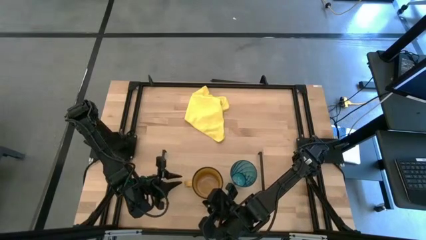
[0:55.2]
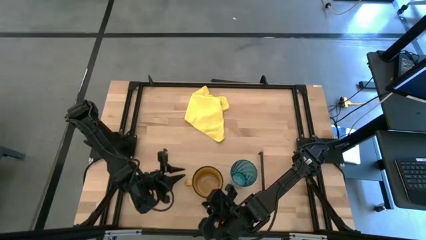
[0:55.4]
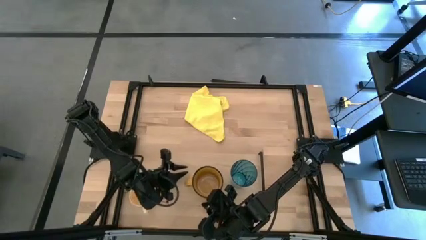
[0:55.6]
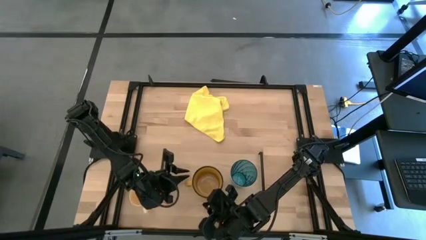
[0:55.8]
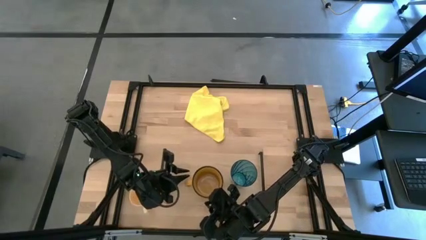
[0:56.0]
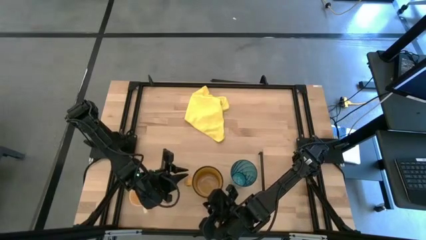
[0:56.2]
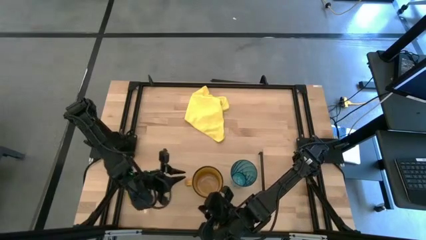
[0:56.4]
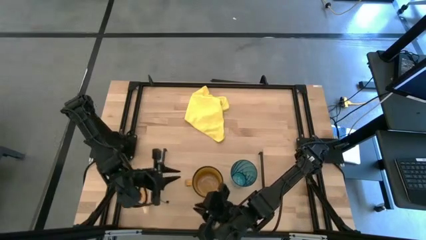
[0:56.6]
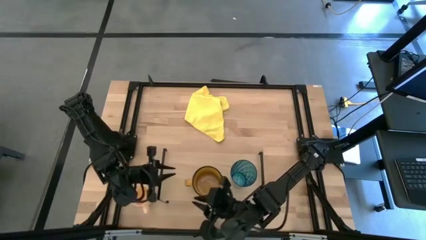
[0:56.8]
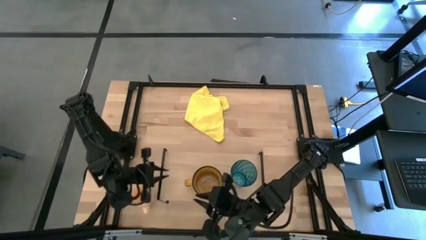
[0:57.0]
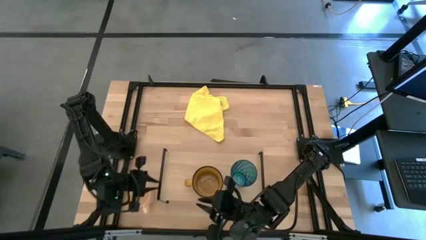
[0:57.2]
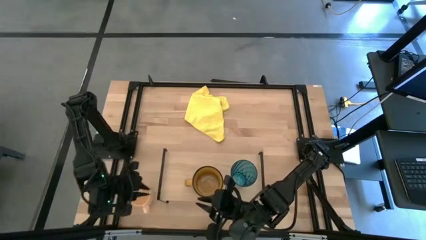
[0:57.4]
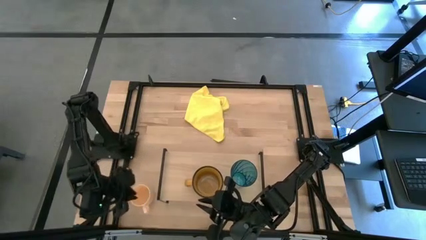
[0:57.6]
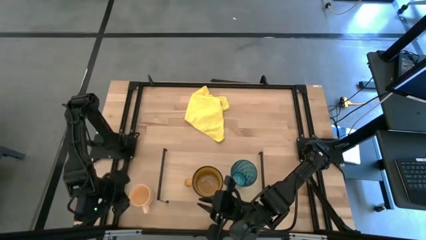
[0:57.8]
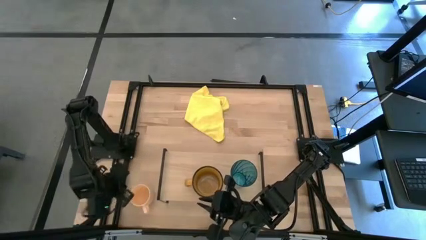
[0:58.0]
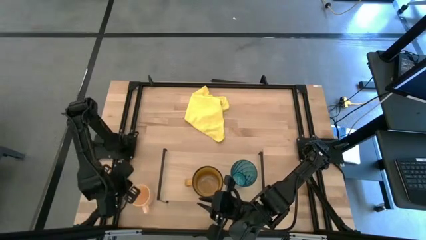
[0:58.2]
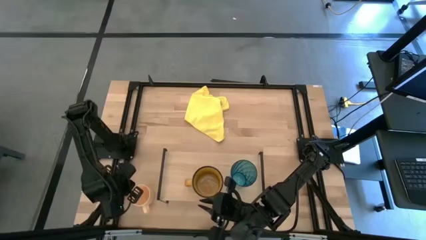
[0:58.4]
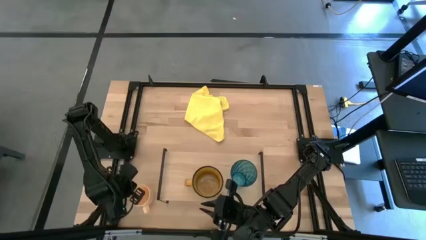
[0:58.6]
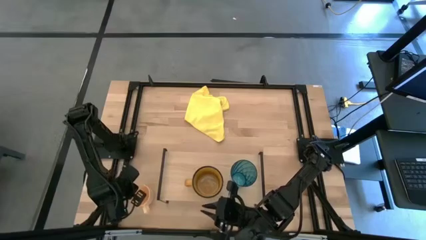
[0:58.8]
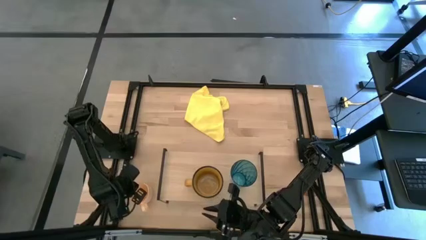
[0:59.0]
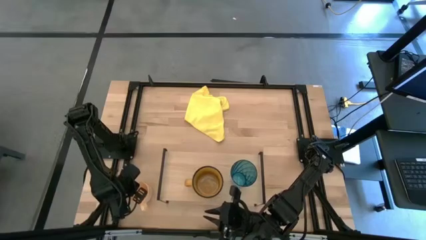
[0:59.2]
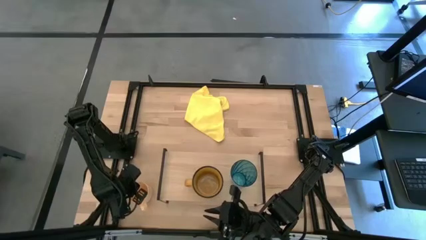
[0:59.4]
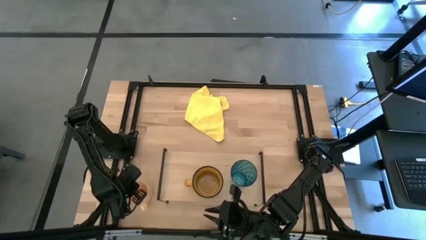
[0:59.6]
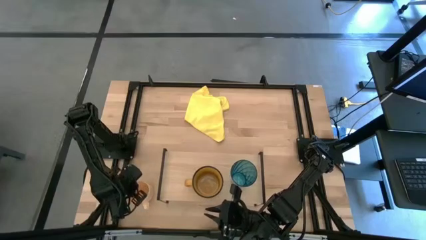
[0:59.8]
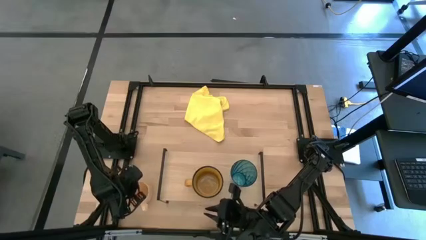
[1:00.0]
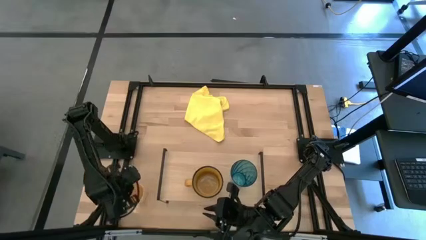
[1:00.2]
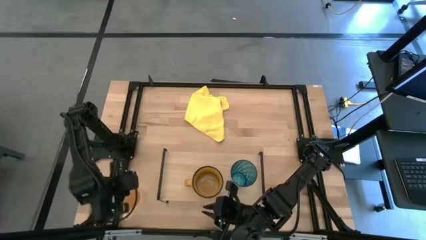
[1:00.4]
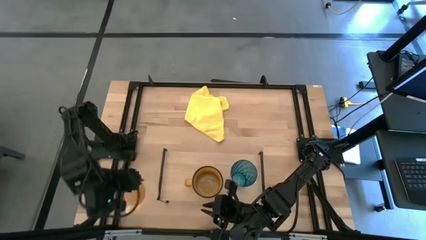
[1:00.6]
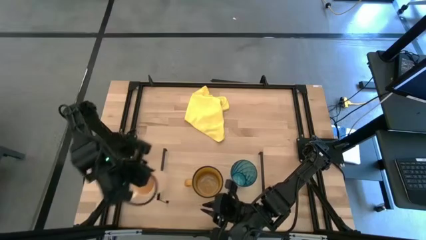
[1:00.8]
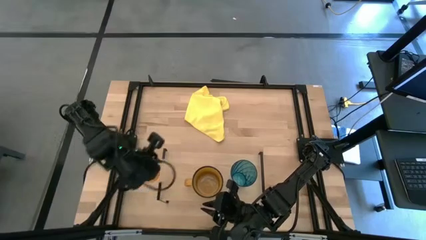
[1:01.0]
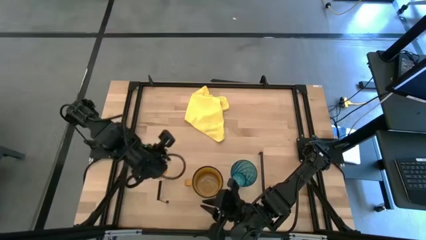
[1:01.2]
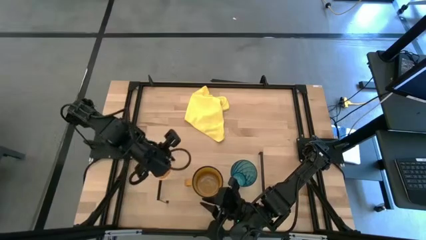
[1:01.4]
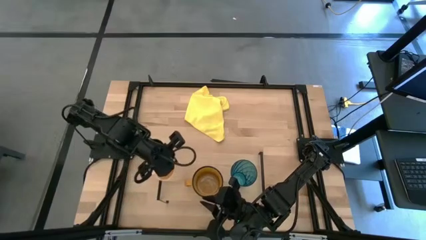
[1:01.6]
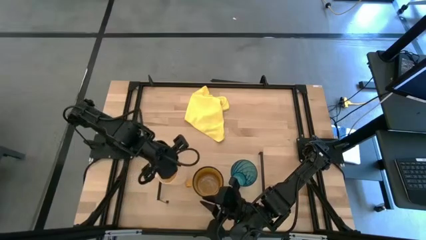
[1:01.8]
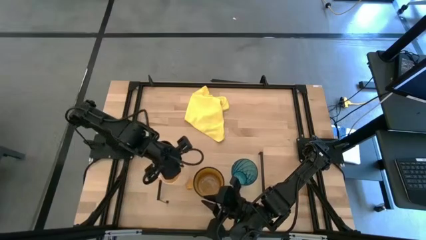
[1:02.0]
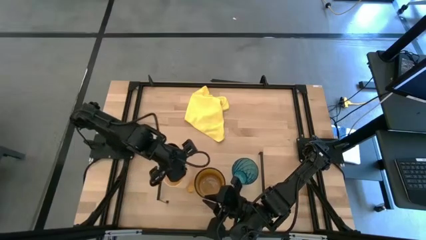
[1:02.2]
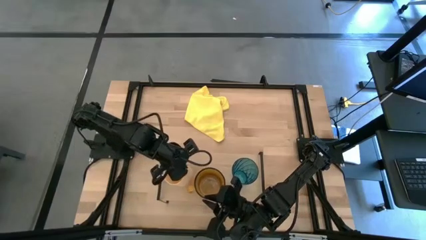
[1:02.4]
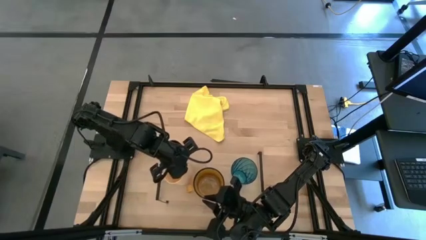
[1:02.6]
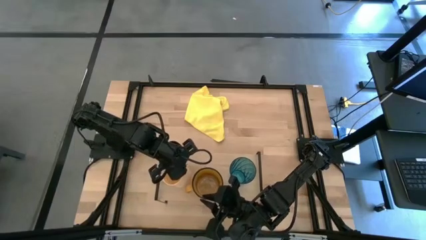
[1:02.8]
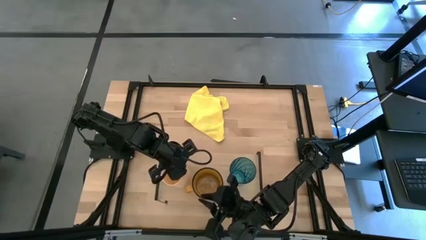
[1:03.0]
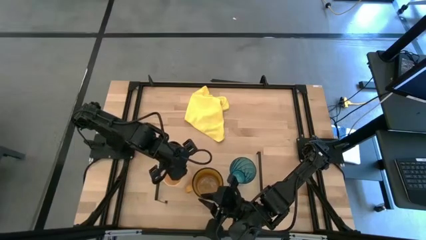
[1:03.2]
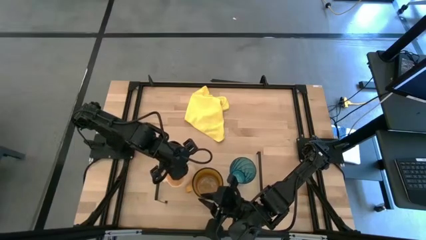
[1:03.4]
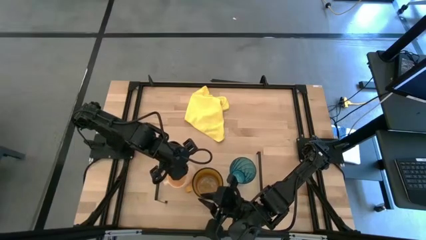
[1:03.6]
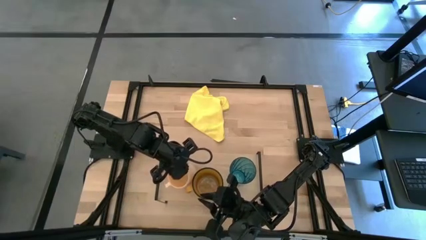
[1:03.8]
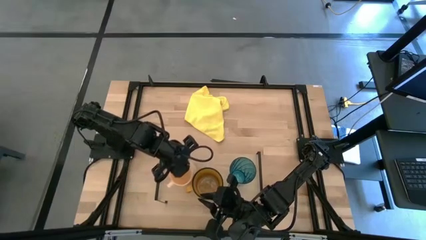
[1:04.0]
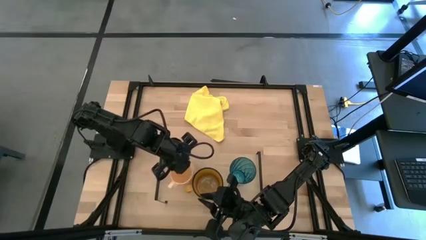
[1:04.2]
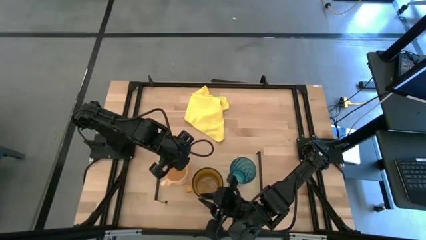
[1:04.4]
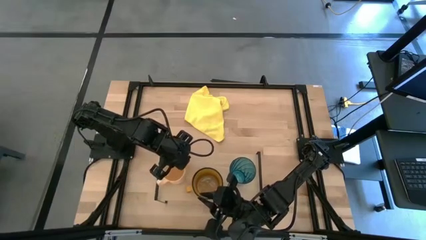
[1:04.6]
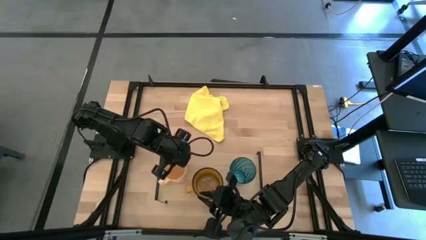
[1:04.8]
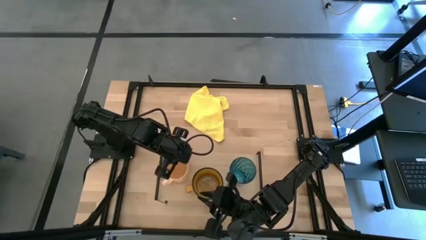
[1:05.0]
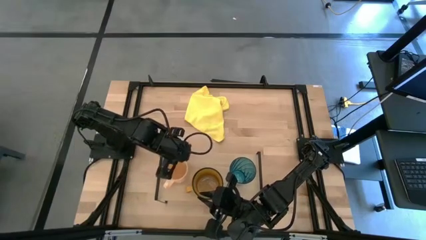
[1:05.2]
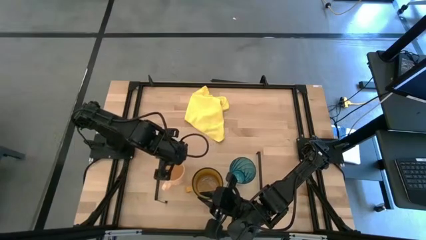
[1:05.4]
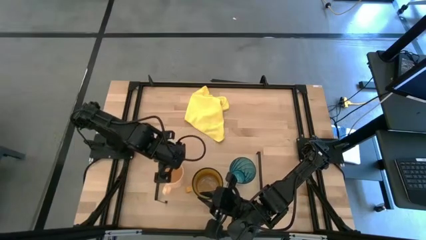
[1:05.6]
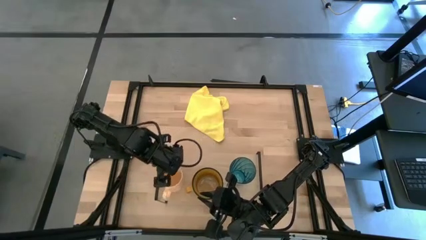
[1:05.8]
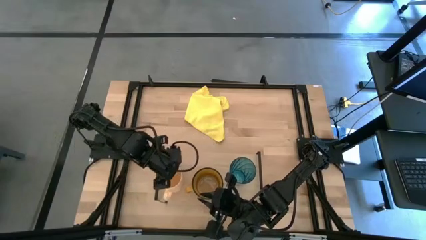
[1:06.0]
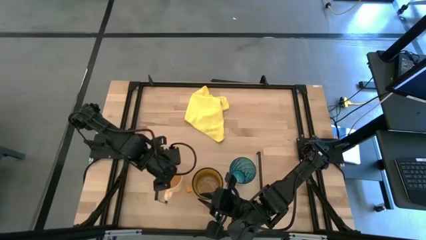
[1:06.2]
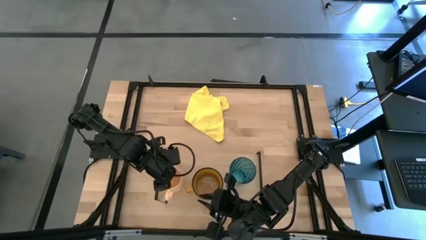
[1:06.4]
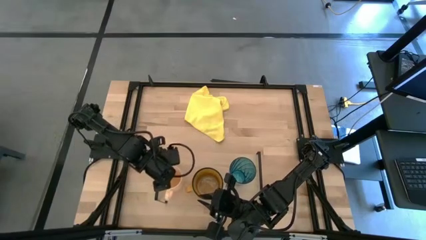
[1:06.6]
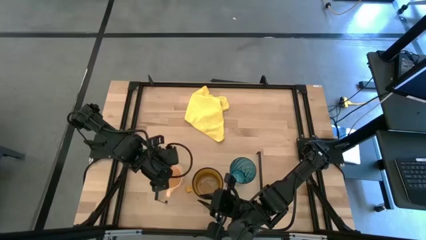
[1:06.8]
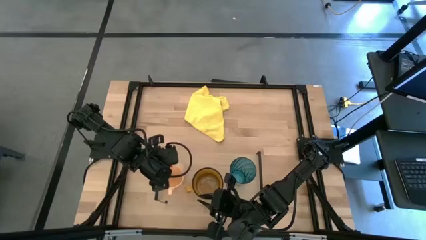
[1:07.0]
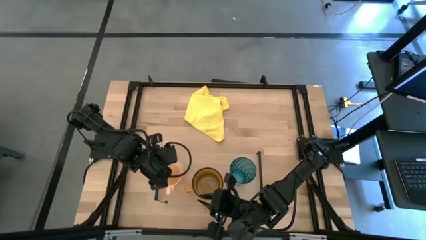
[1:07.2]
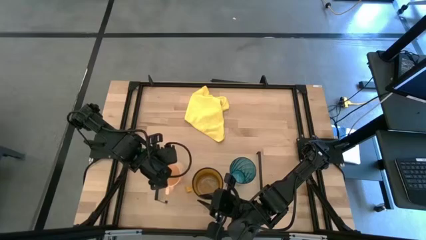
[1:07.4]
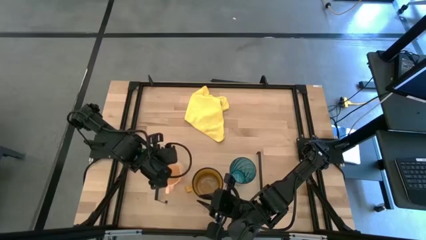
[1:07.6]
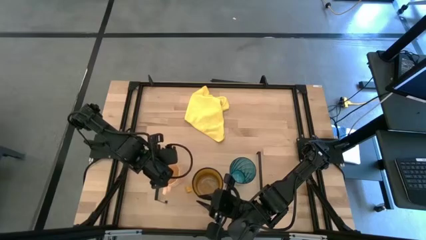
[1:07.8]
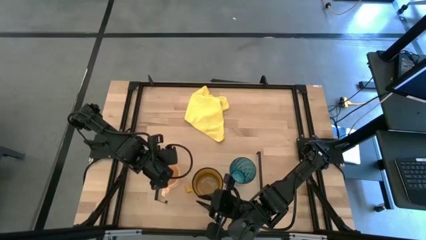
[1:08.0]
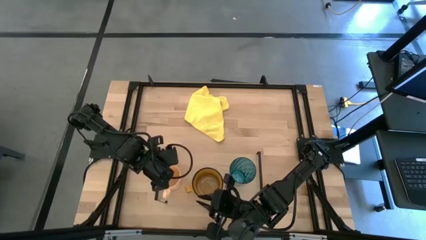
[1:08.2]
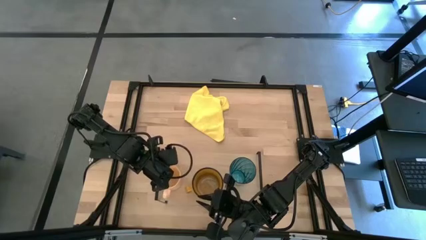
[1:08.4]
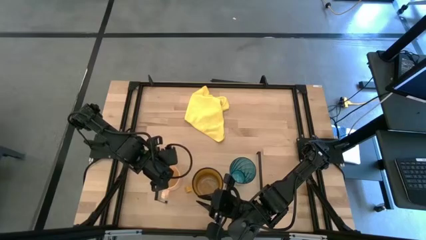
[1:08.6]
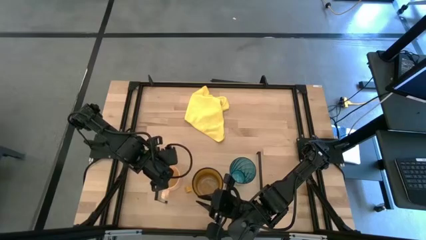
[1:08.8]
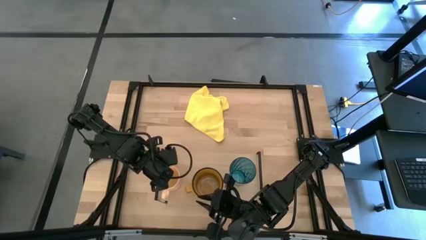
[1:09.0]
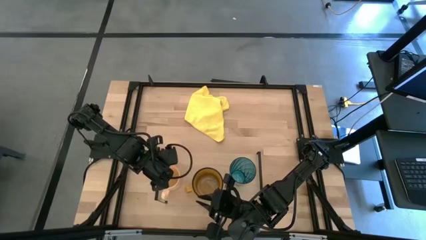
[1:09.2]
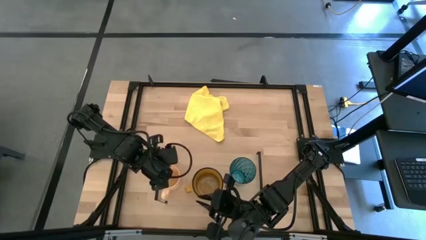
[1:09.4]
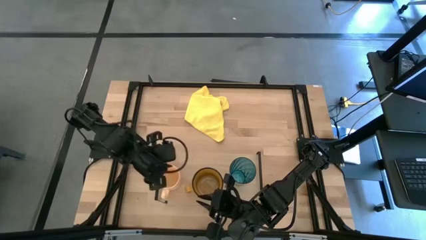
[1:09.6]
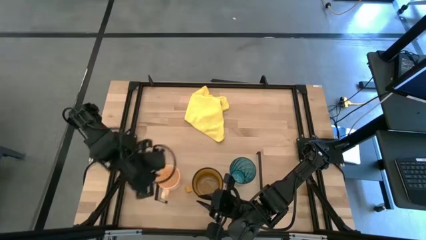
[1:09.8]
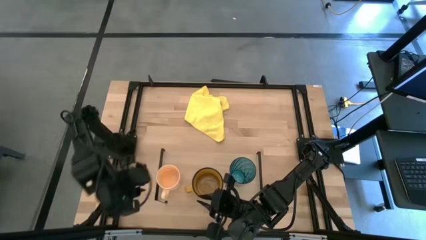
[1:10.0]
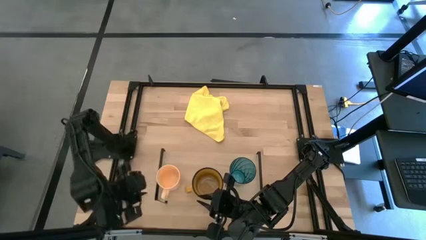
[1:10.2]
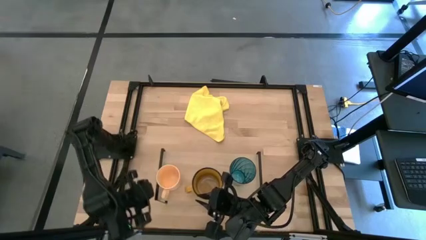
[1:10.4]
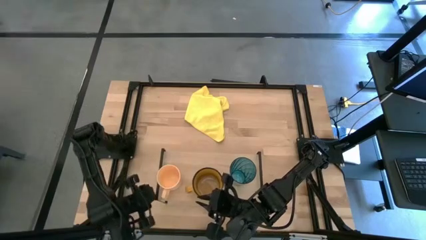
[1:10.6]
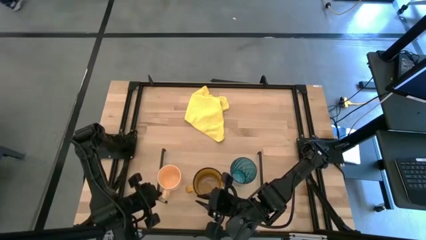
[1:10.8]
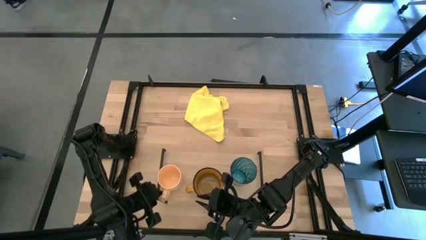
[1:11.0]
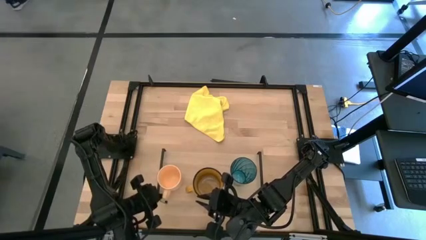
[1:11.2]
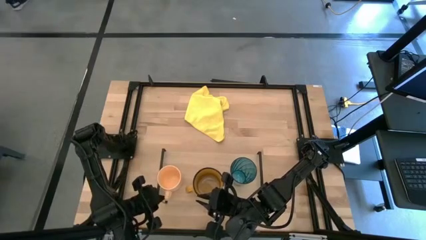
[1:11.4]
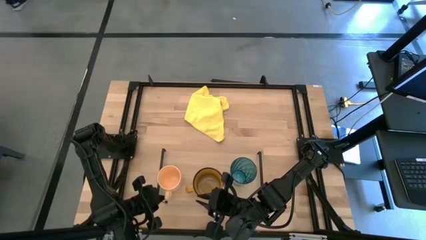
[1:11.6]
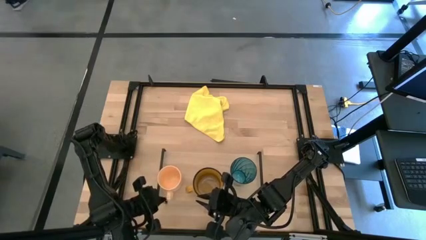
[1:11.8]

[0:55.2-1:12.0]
Task: Stack small to large cups/mugs on shelf
Put the light orange mug on the shelf
